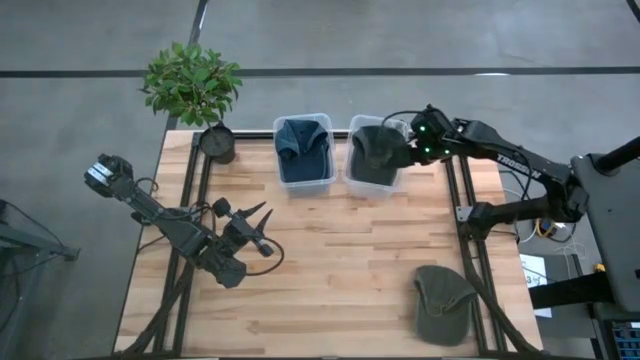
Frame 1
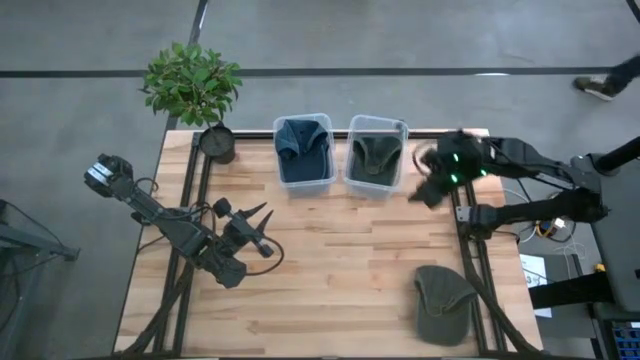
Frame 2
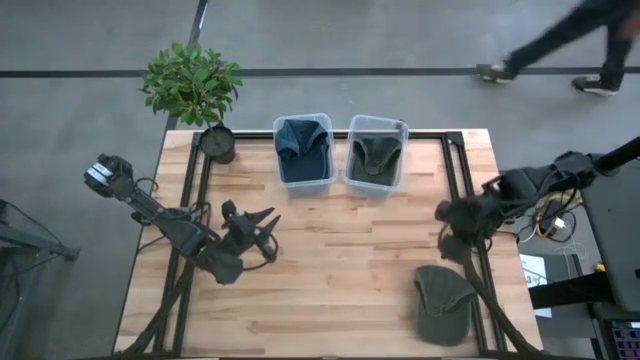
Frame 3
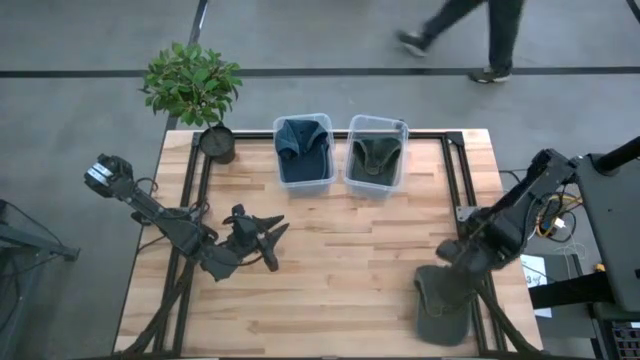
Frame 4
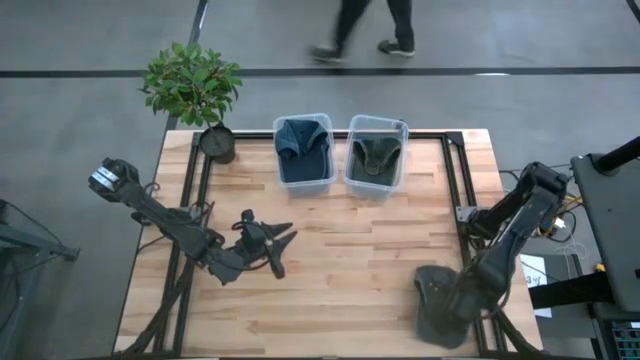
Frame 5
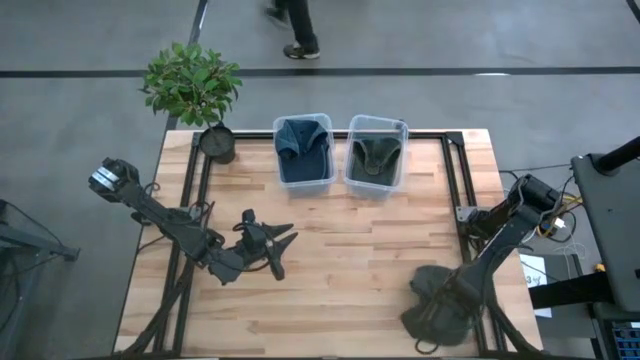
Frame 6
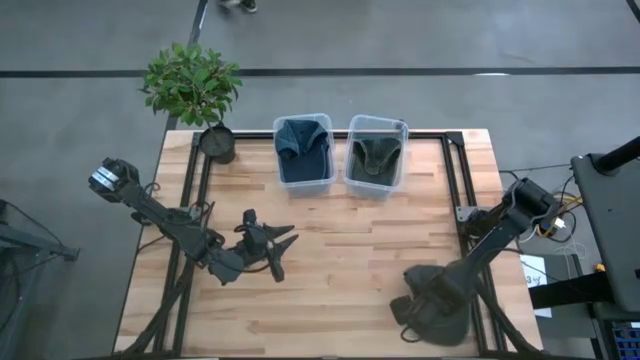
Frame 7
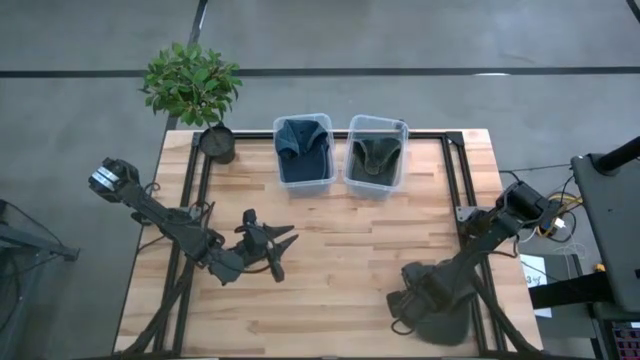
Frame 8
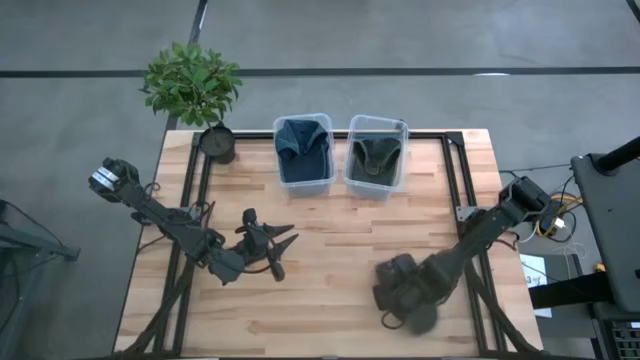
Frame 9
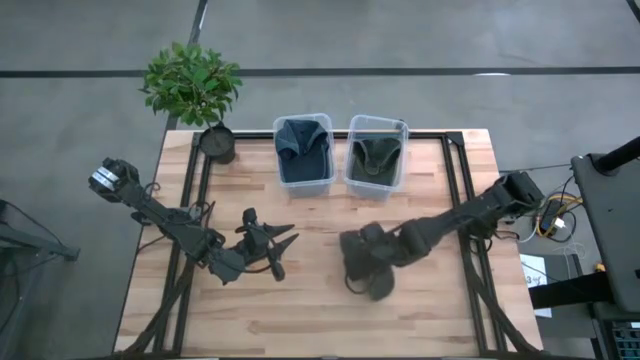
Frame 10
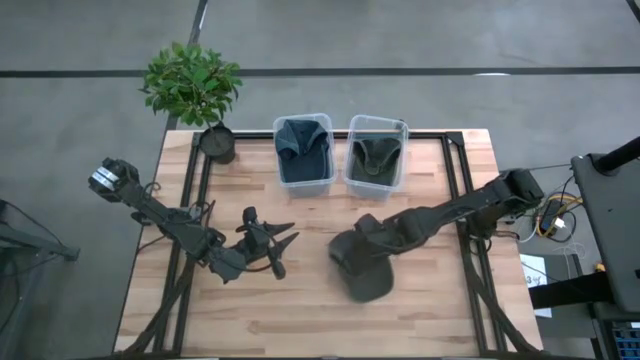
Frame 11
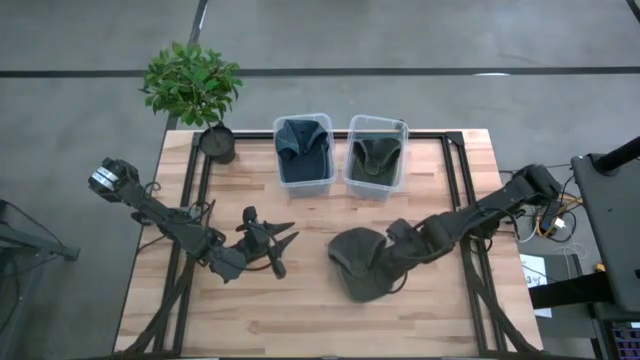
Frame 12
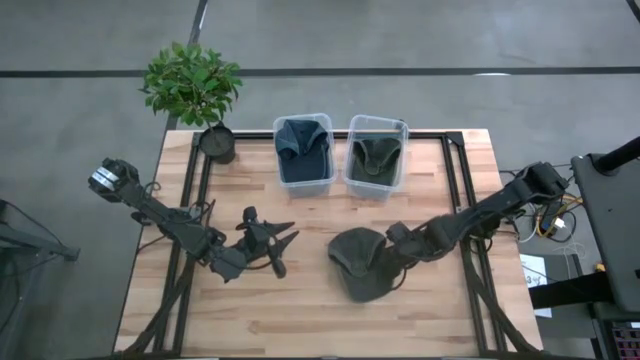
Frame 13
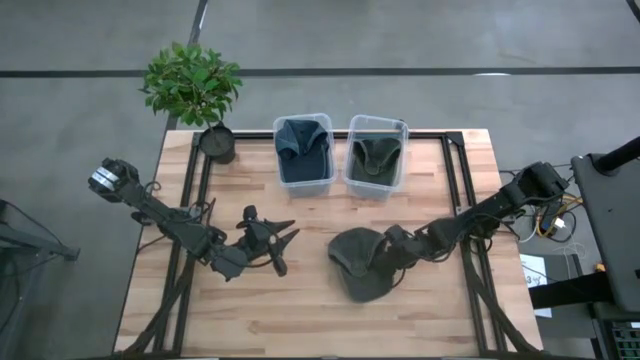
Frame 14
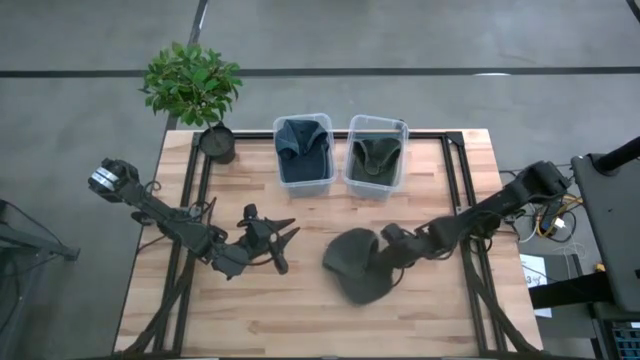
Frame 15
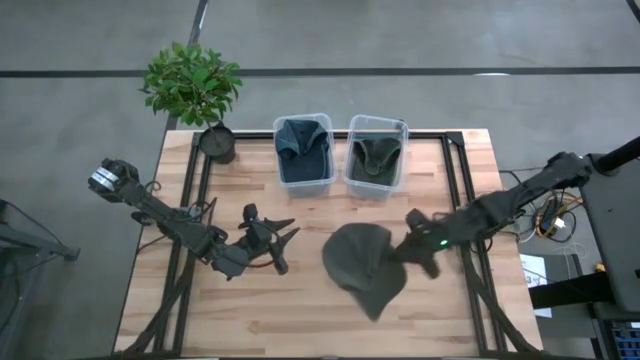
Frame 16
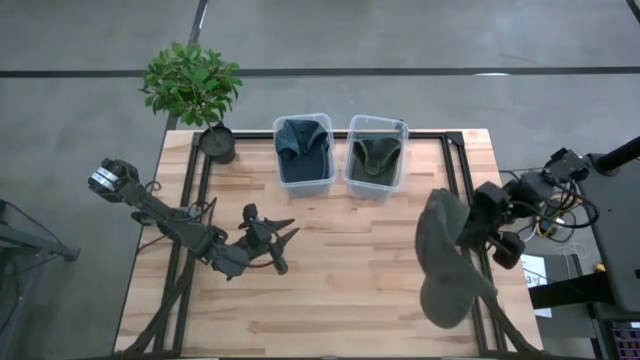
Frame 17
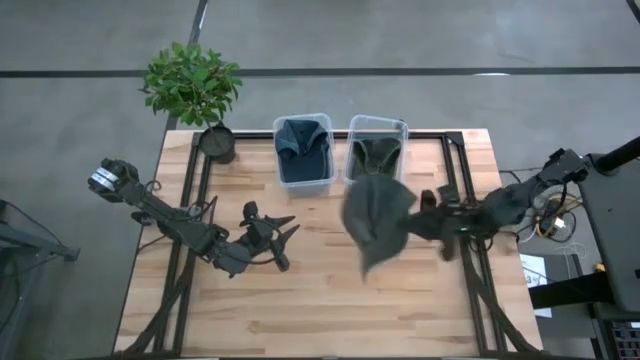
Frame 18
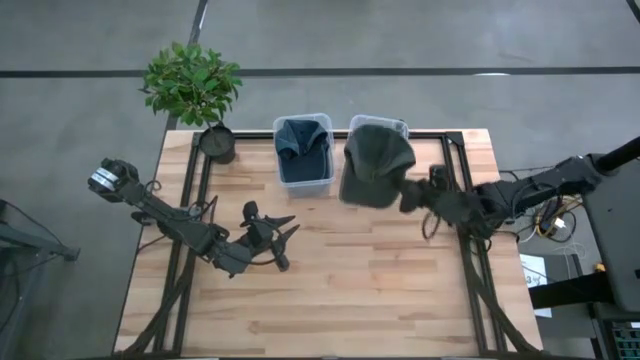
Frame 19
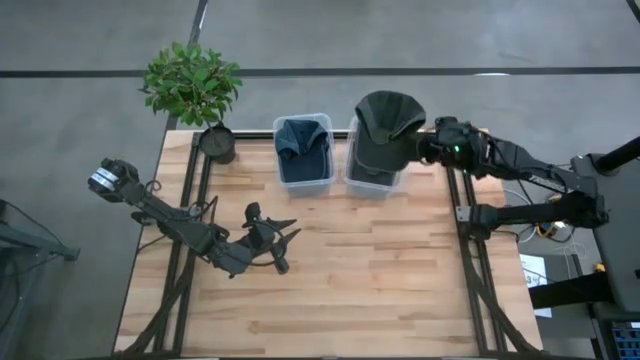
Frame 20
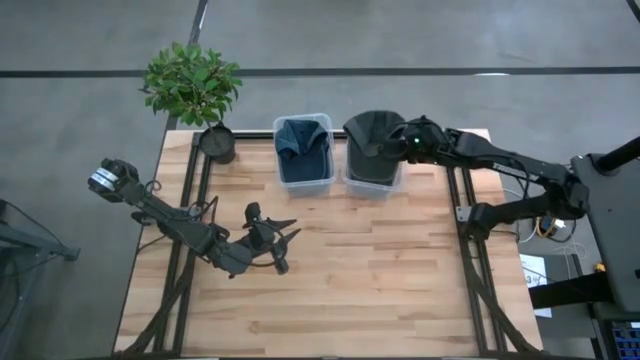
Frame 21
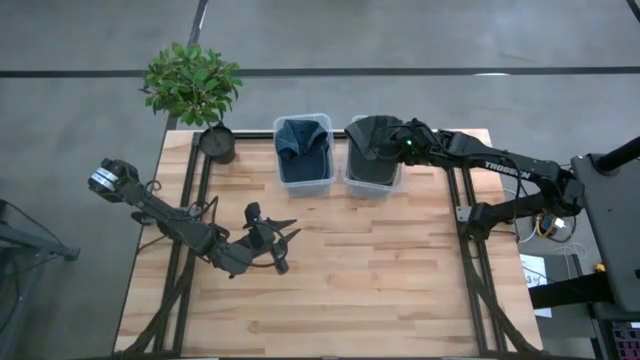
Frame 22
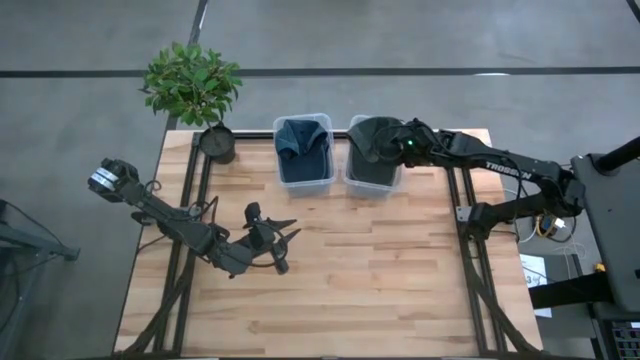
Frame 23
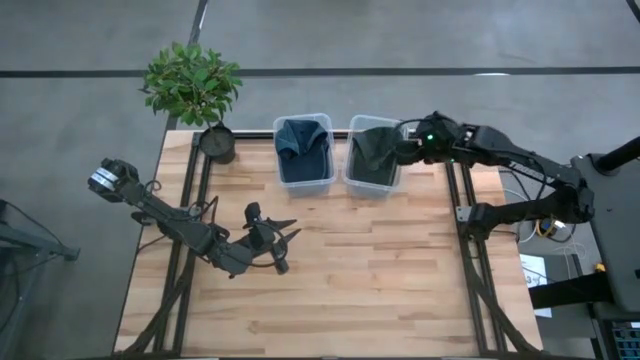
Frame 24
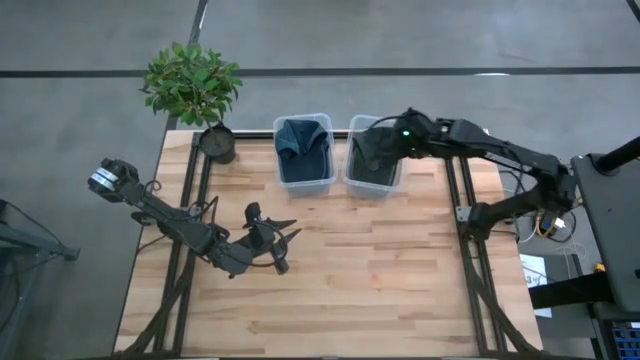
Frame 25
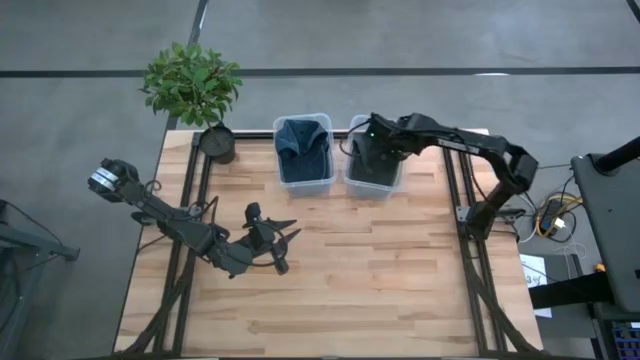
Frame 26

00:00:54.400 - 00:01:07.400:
Task: Pick & Place hat
Put the black cap into the right transparent bin

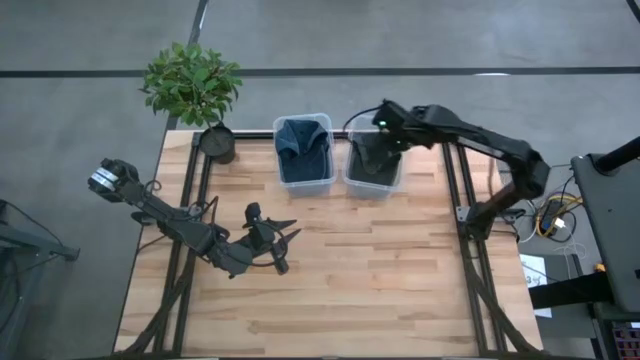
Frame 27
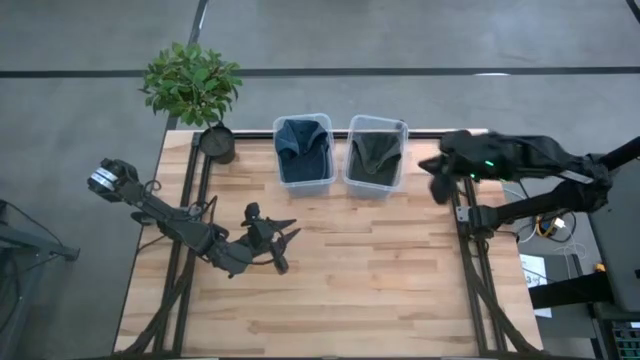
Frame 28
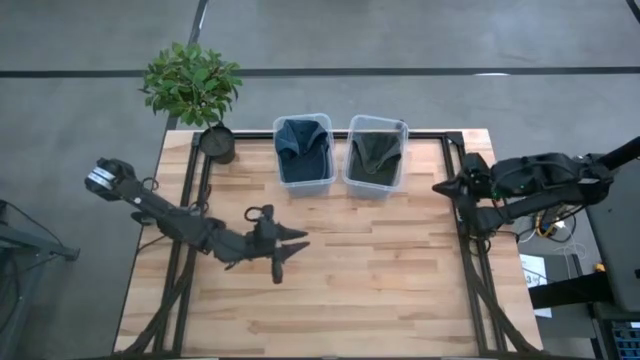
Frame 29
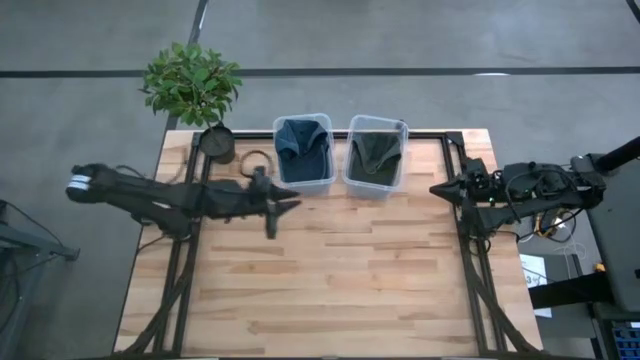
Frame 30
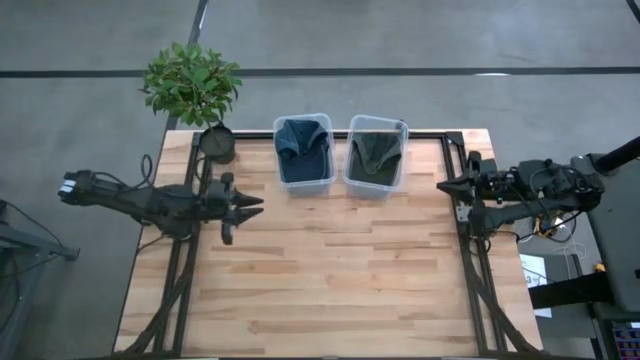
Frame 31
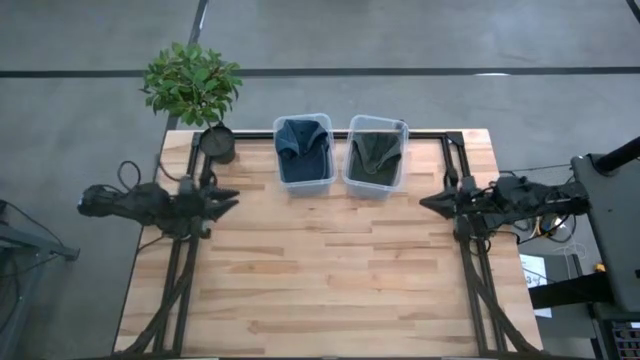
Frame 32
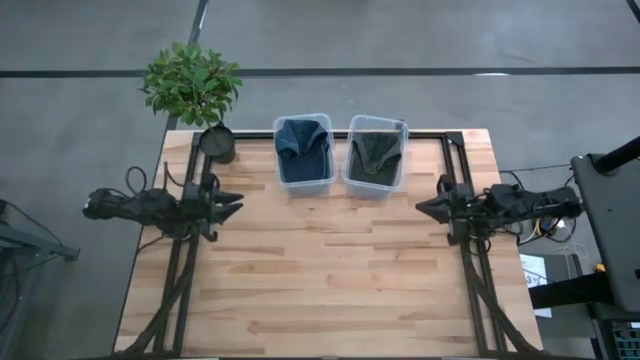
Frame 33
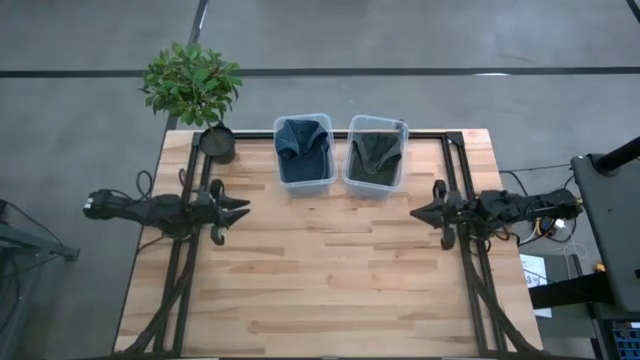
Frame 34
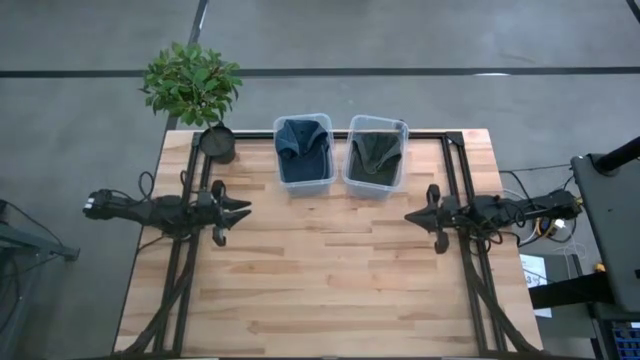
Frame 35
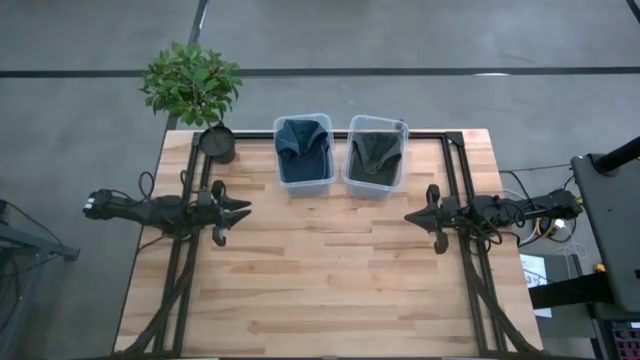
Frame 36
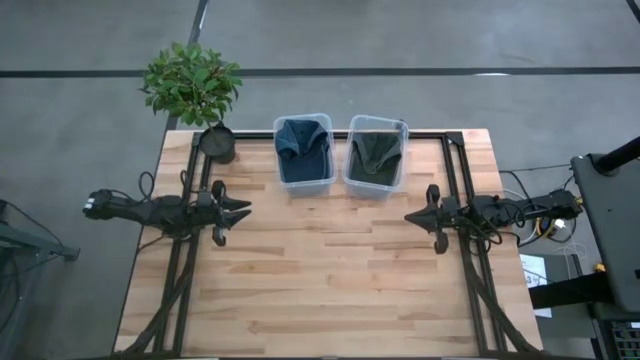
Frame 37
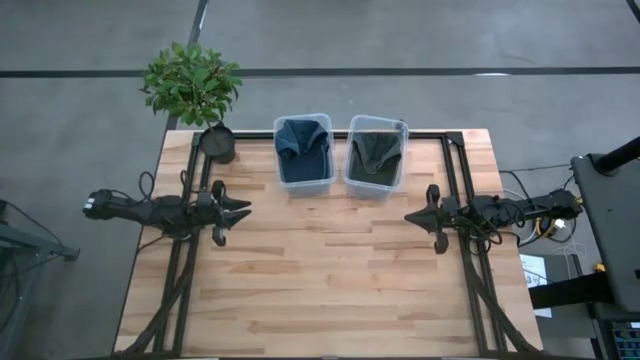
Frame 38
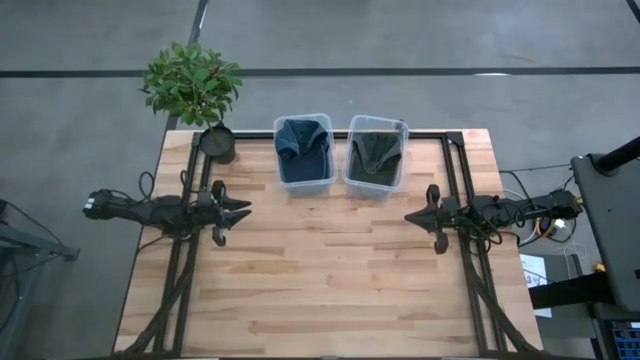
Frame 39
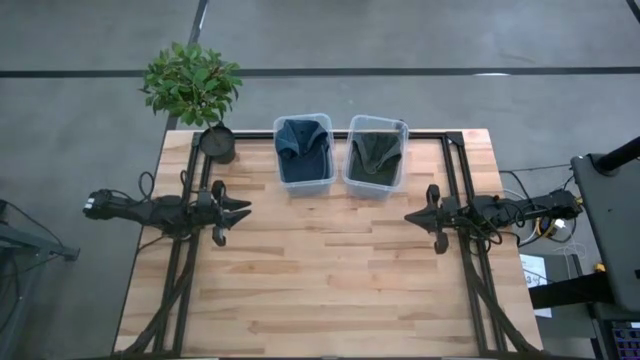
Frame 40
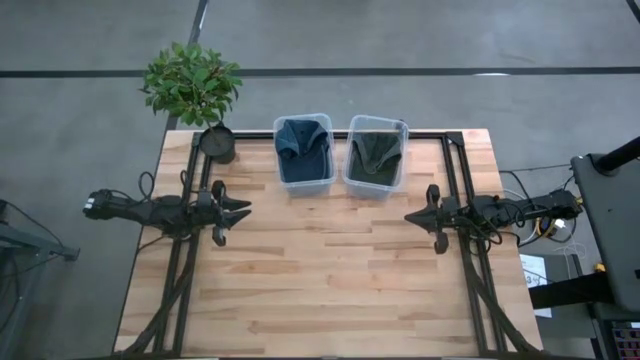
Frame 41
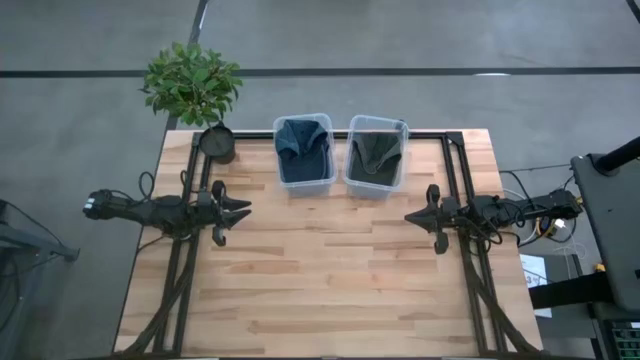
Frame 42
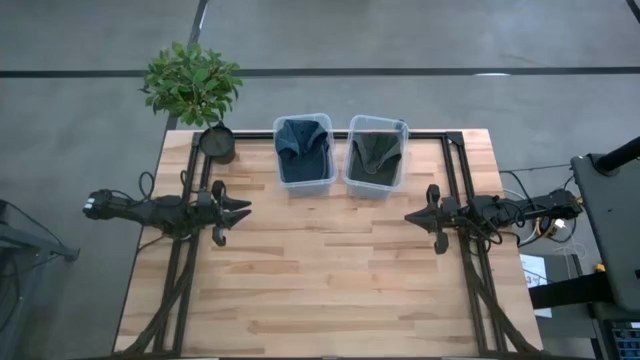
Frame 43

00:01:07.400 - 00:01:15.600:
Return to Home Position
